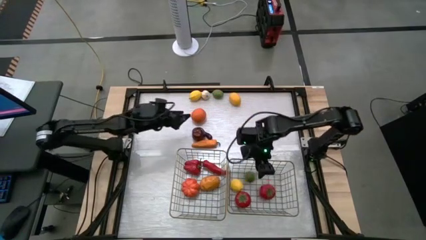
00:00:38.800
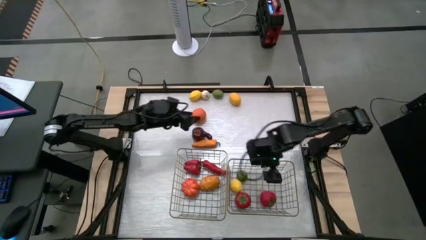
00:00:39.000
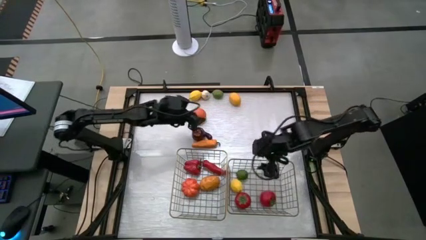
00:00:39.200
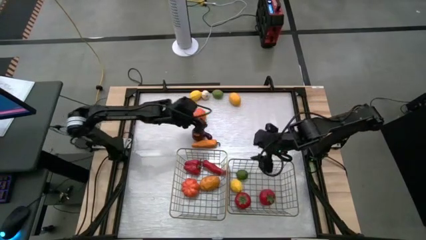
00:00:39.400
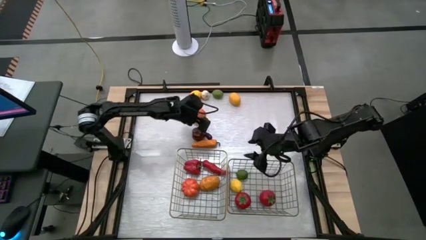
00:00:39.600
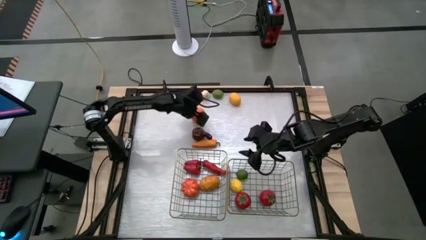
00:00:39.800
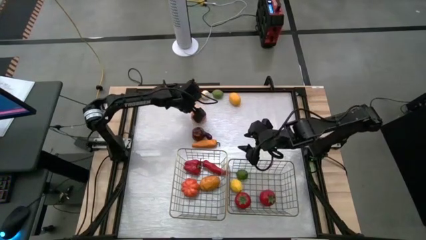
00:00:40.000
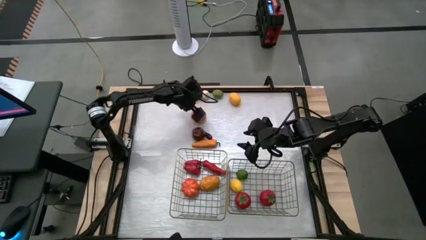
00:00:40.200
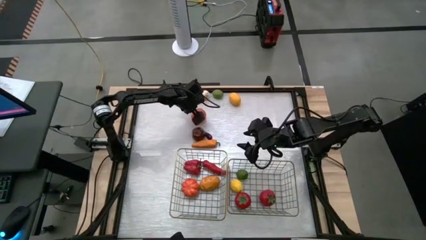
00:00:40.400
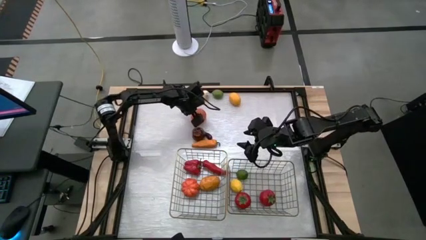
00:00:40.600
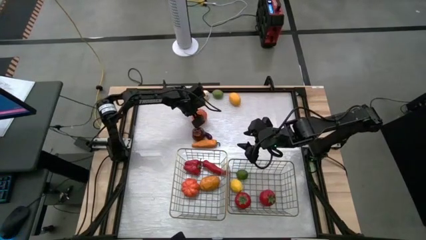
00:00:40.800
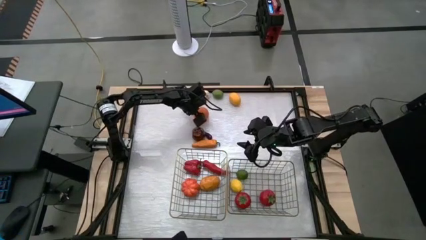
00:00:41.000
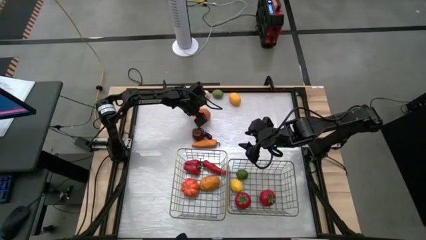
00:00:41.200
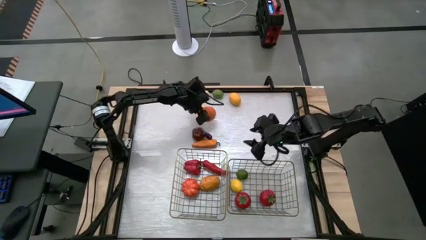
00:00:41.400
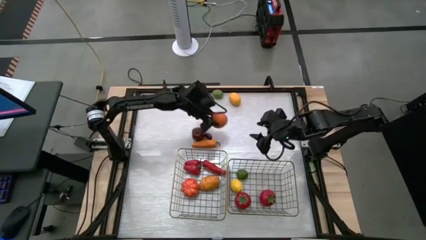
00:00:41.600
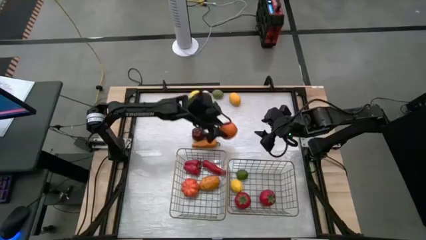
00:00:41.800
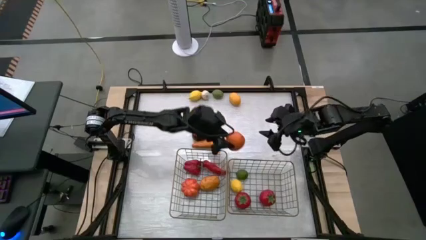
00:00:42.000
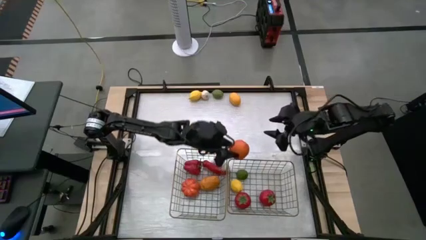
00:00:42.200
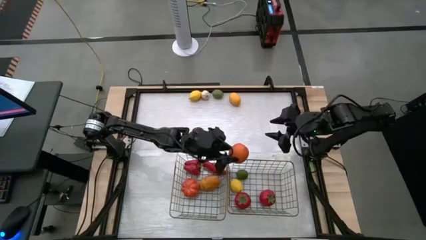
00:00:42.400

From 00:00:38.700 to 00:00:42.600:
Task: Sort produce into baskets
Put the orange into the right wire basket

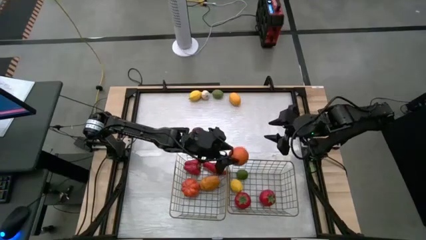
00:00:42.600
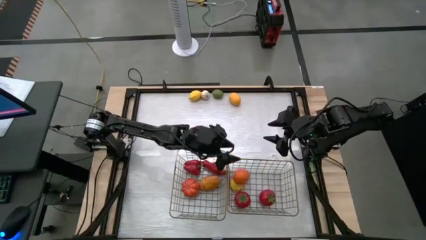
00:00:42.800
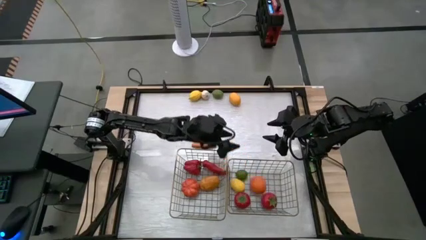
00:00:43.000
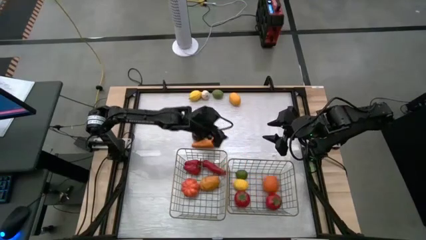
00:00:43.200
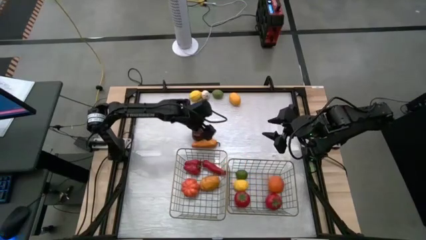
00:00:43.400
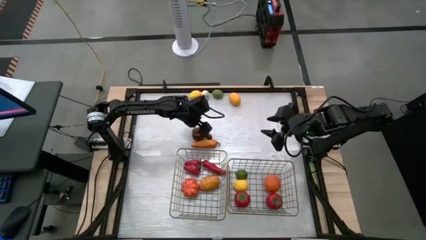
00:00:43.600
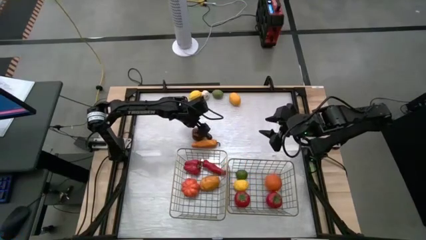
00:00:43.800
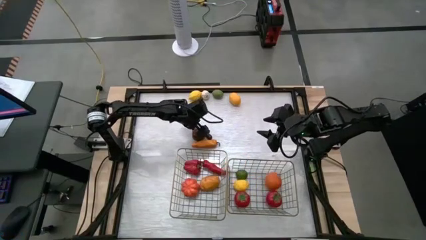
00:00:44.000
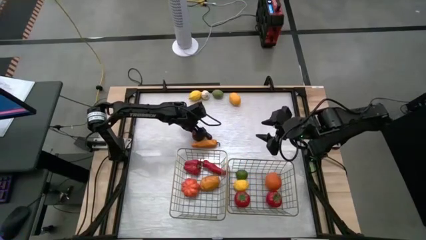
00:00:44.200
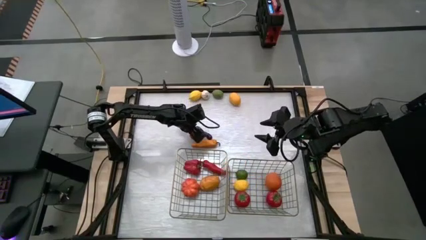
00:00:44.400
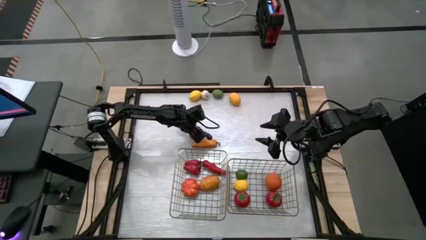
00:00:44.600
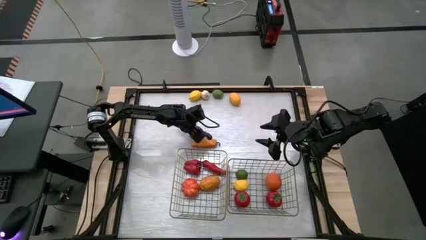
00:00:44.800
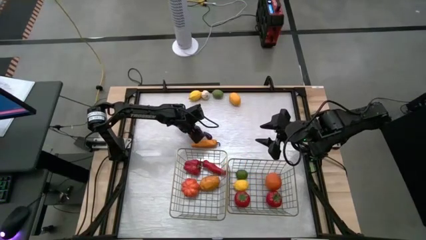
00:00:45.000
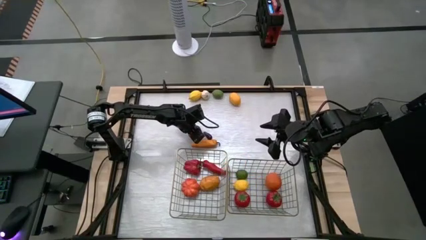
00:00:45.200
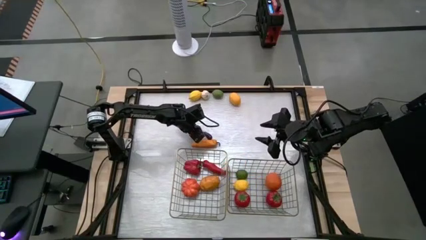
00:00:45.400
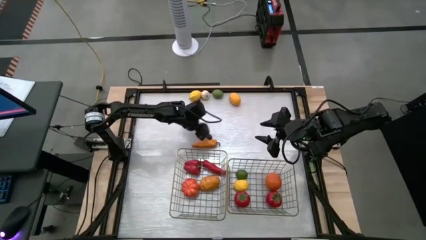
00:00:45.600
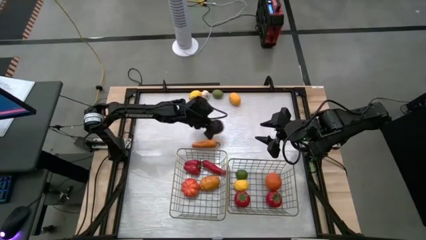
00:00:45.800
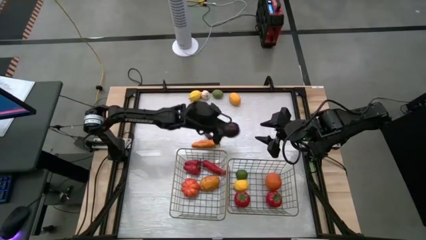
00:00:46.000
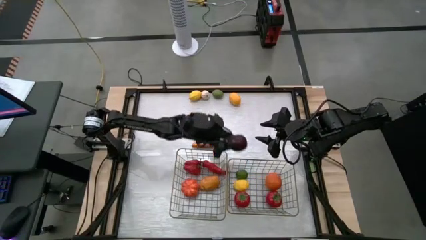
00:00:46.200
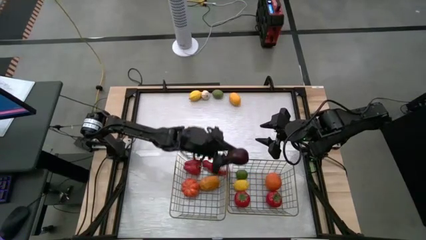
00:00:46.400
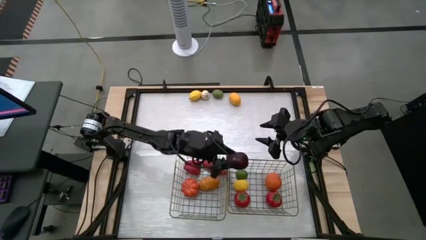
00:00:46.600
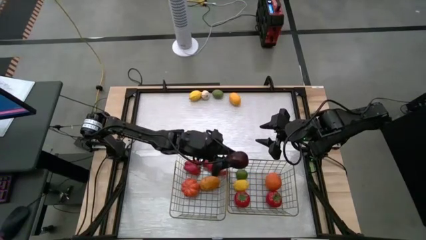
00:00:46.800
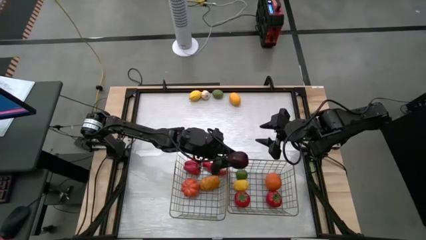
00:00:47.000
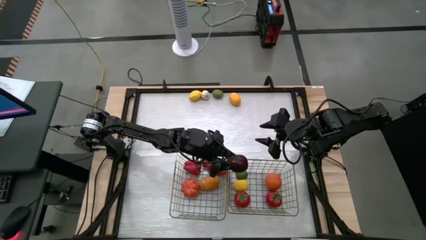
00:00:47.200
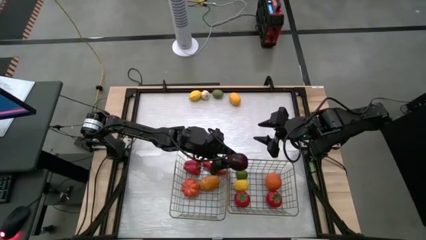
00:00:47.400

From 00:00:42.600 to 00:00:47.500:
Put the red apple into the right wire basket

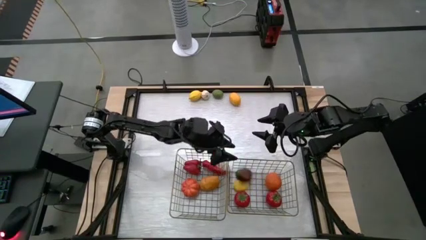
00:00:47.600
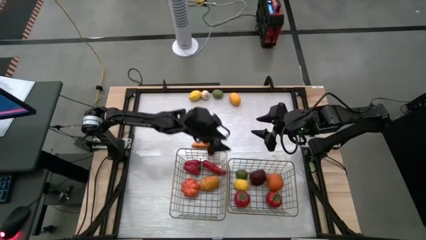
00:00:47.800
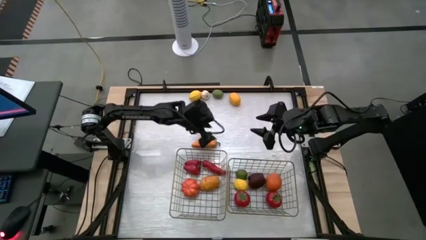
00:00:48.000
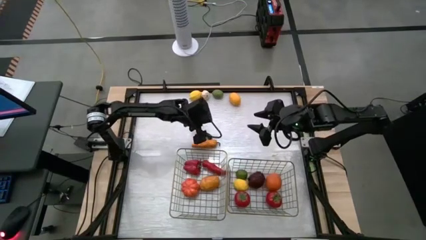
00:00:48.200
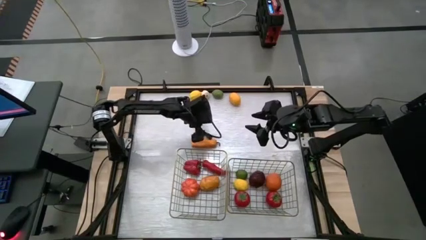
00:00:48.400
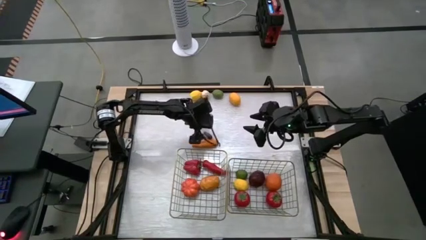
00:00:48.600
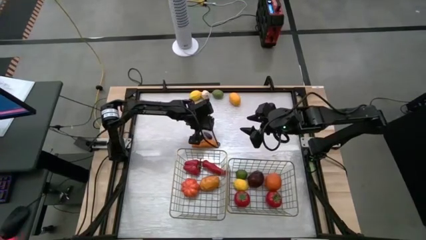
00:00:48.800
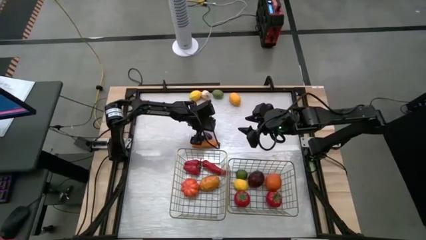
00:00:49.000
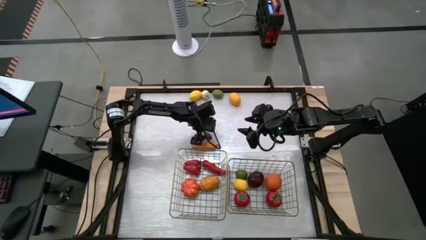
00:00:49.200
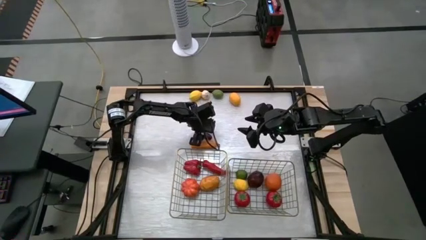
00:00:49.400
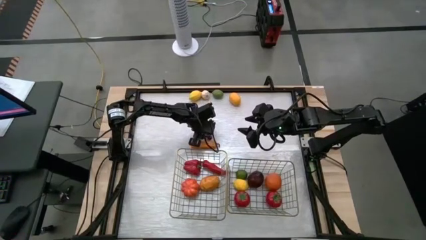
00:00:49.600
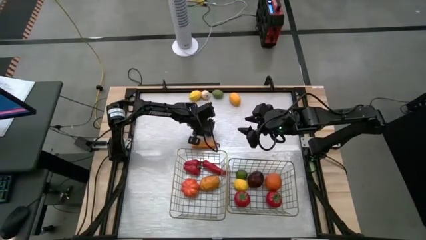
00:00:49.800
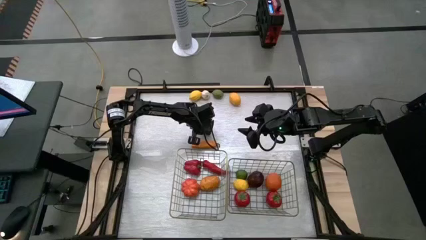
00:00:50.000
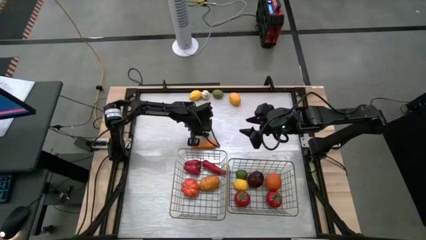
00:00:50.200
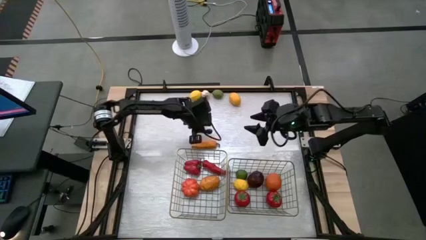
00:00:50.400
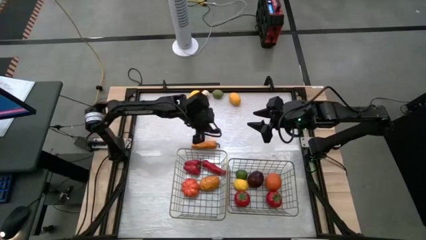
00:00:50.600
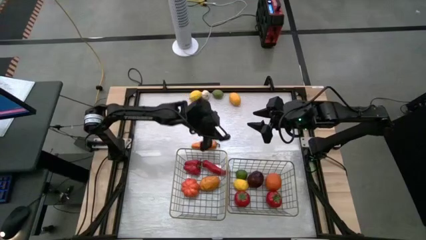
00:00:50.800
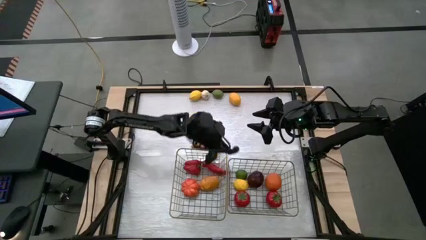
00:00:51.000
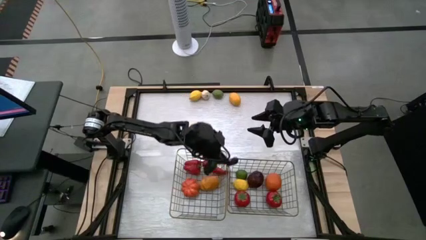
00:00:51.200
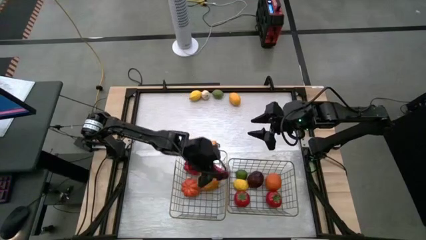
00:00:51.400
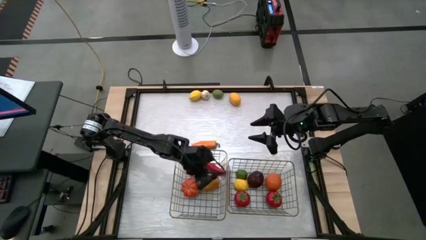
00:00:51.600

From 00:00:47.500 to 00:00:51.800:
Put the eggplant into the left wire basket

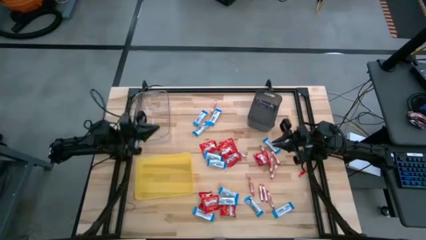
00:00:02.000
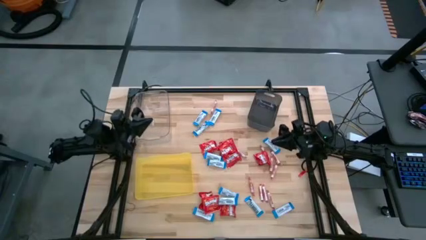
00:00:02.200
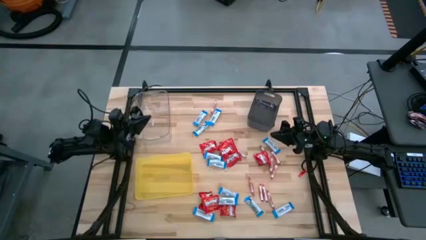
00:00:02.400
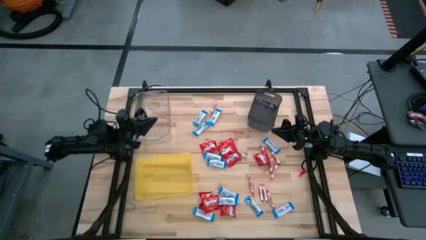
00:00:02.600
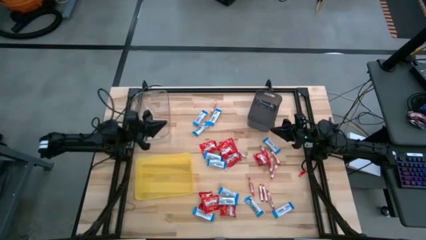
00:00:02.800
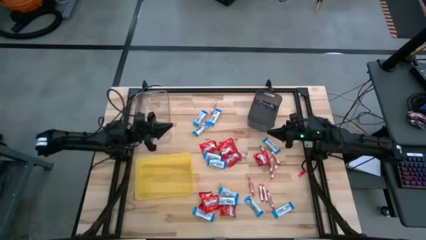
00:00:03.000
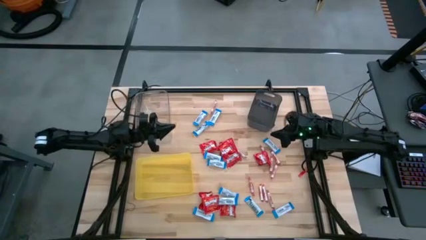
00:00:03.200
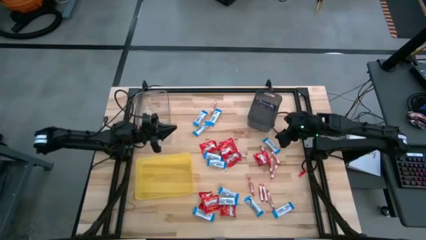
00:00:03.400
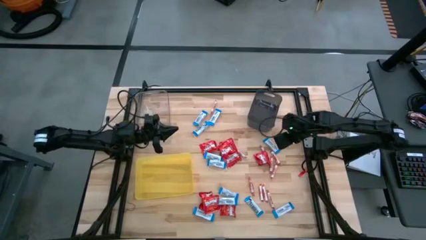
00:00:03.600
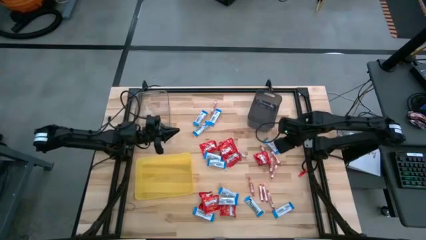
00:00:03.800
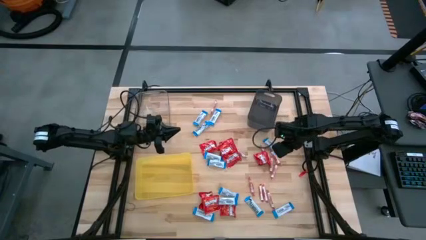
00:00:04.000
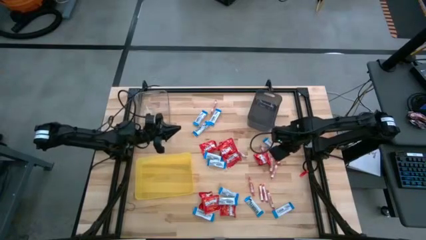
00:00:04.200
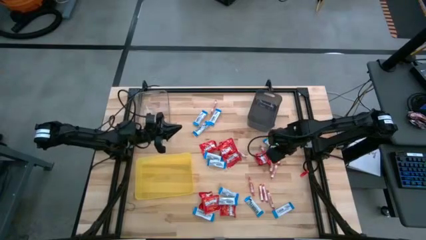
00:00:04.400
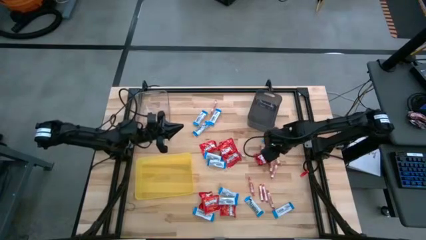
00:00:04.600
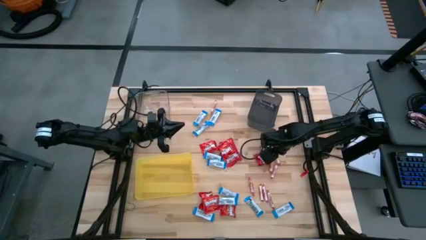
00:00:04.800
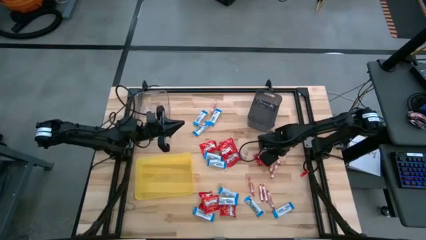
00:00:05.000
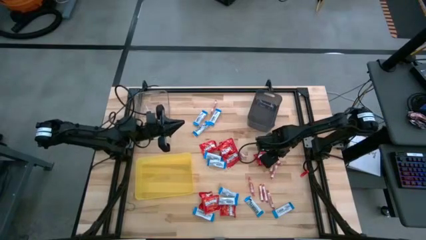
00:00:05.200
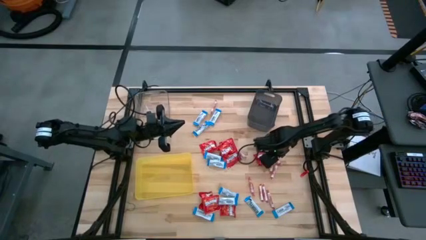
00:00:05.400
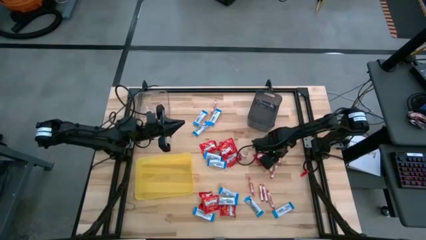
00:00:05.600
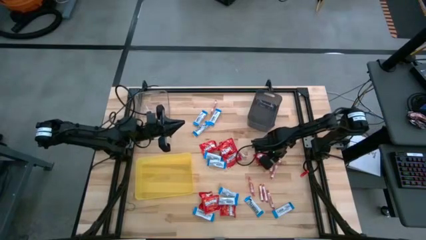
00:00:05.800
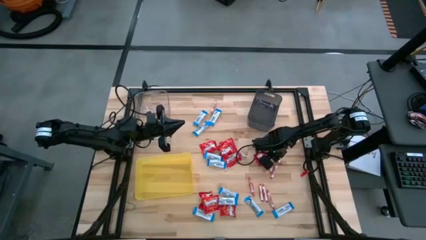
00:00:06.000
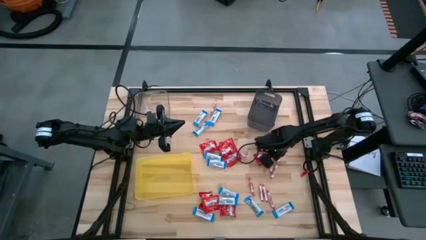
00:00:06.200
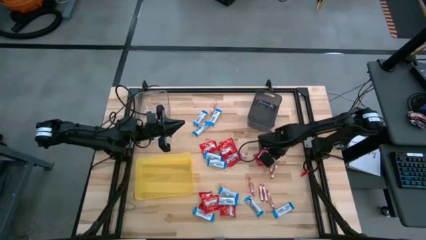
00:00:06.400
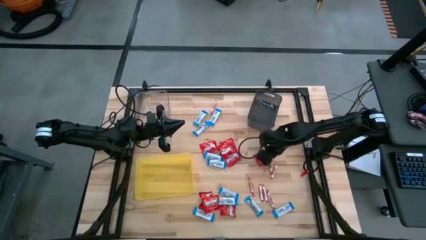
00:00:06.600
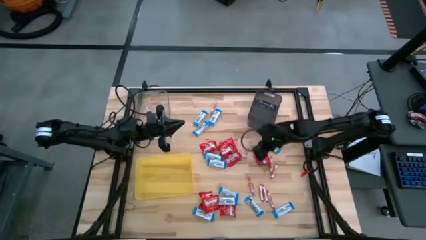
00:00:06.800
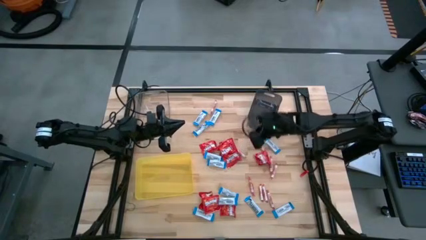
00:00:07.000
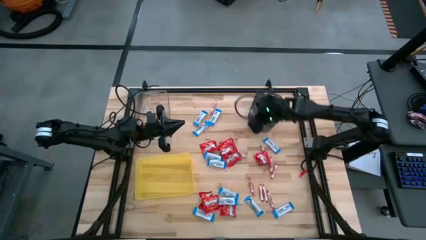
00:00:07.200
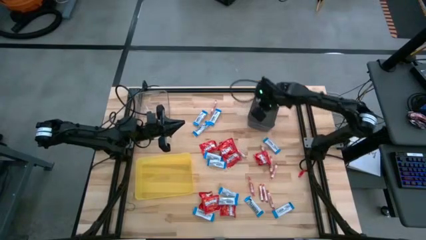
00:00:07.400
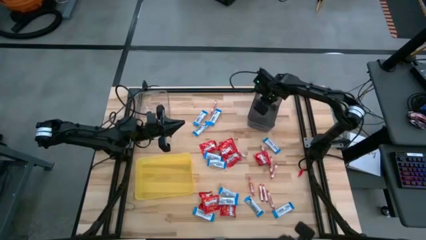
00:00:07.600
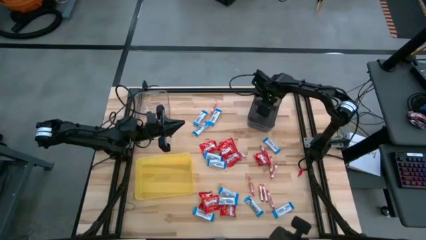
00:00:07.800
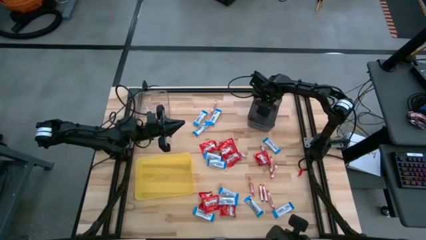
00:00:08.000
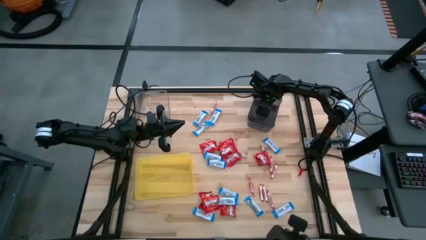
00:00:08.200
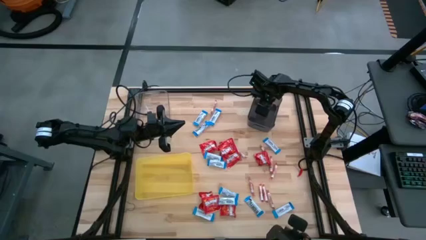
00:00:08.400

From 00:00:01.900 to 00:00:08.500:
Task: Sort candy
Put the white candy into the black bin
